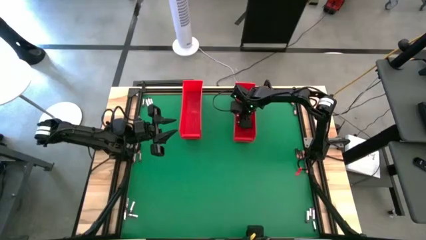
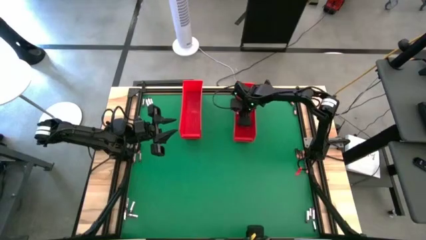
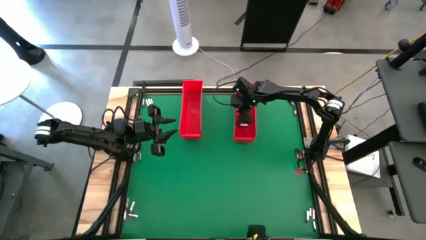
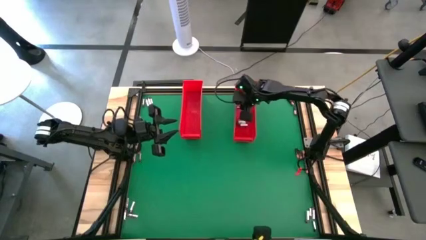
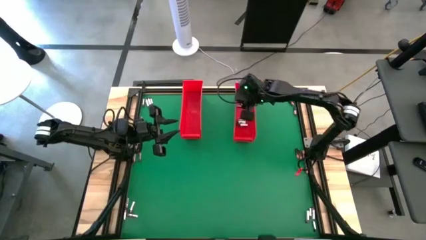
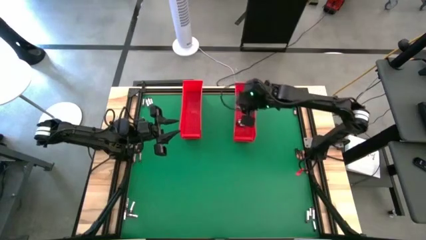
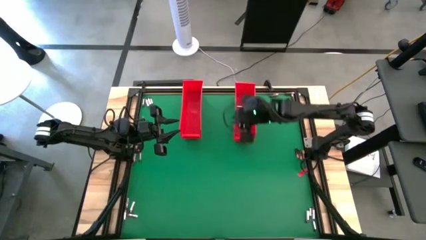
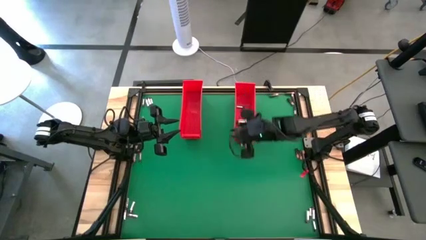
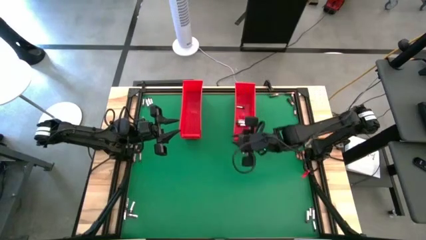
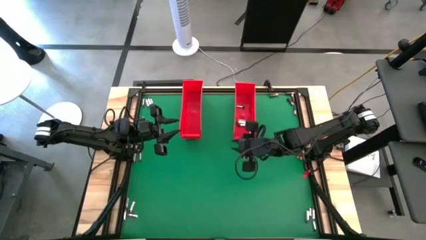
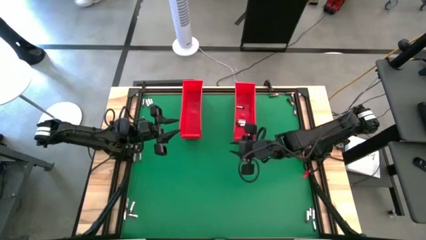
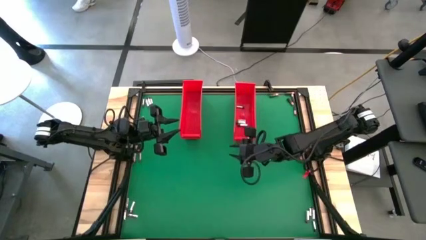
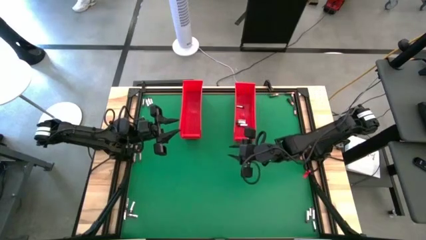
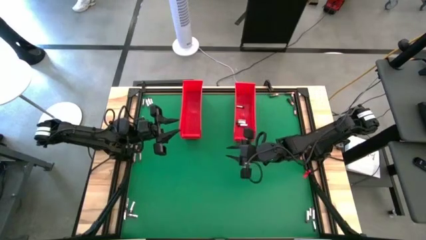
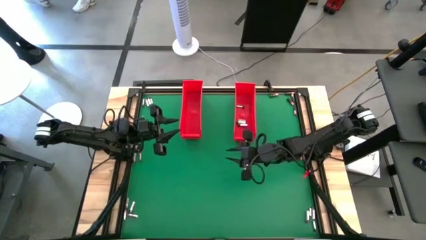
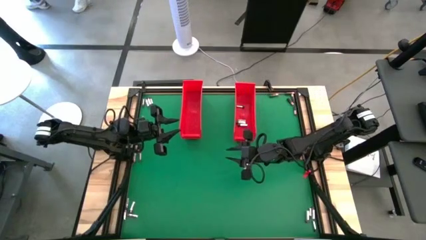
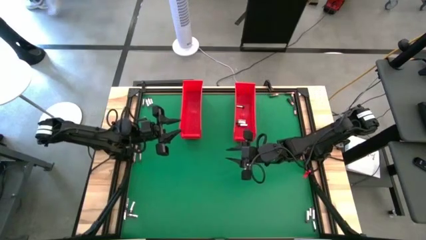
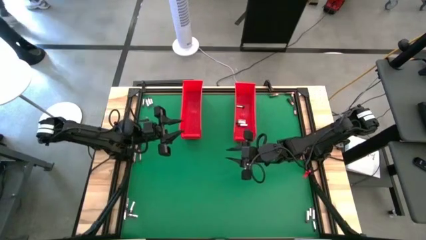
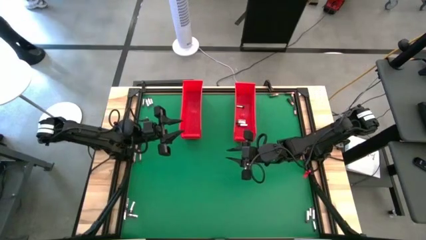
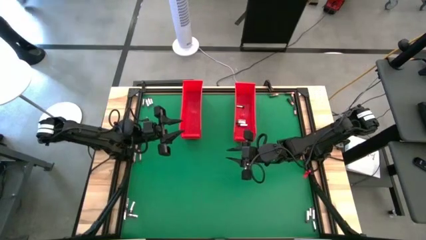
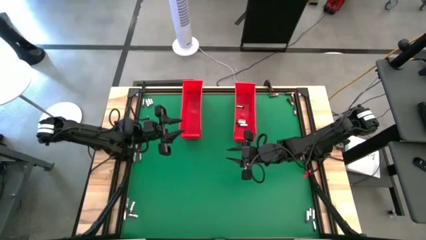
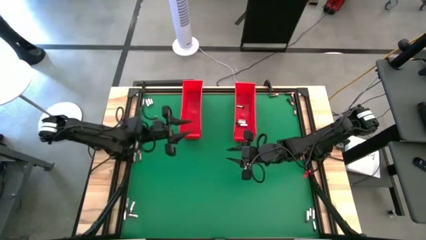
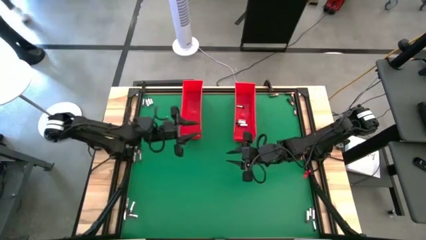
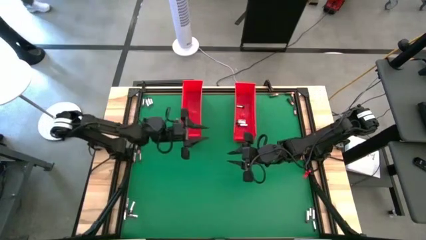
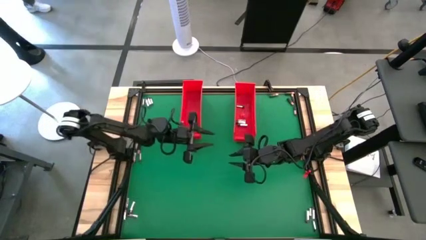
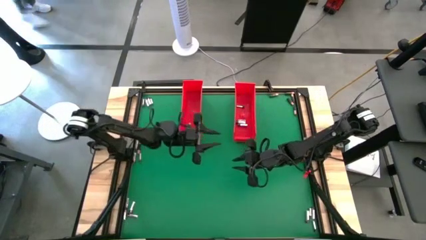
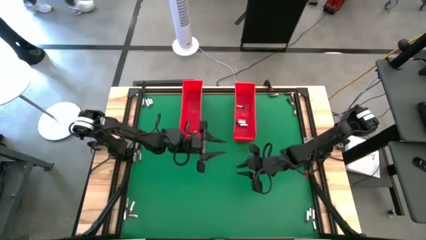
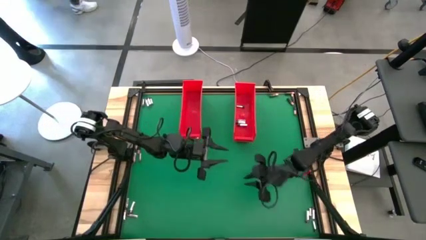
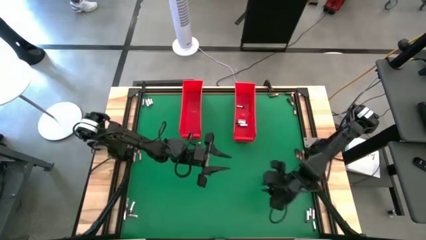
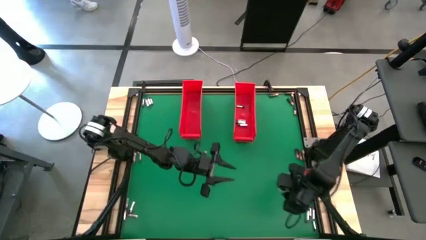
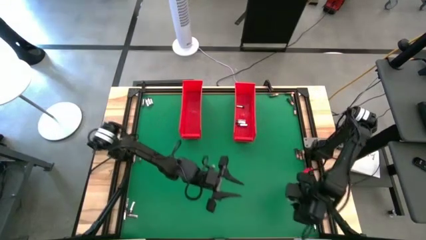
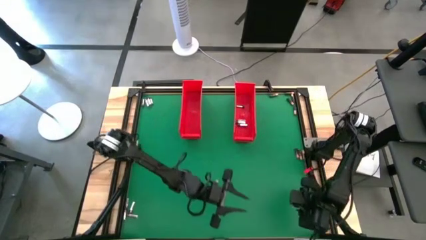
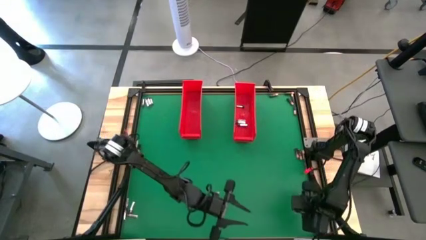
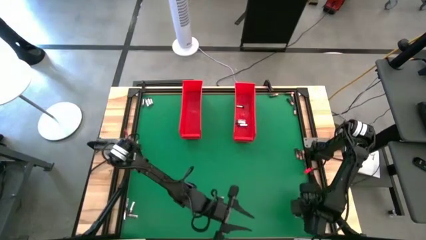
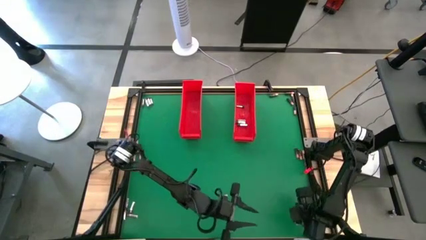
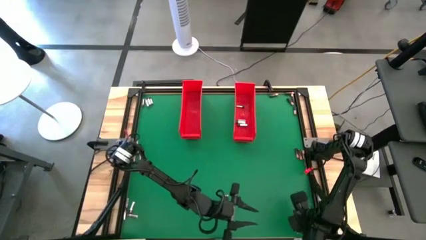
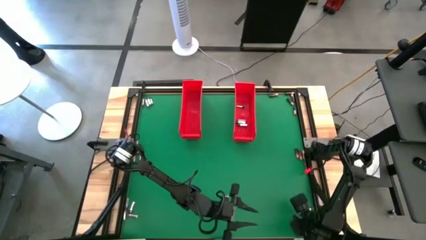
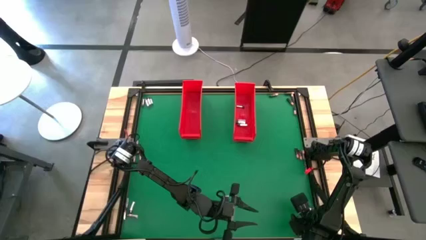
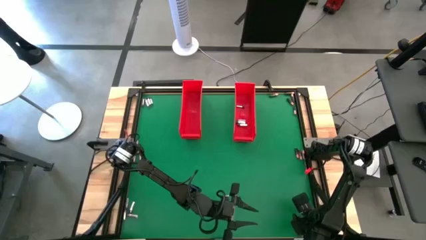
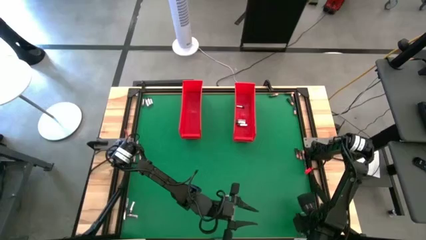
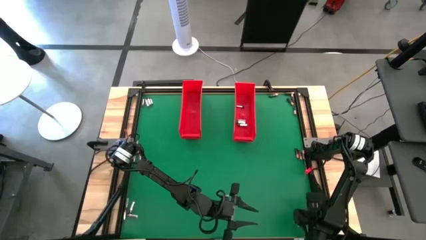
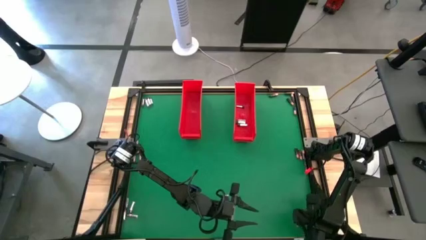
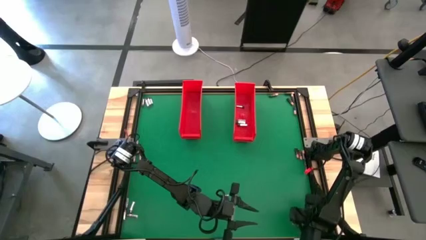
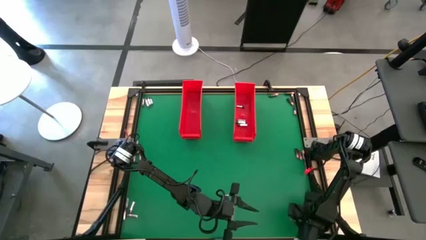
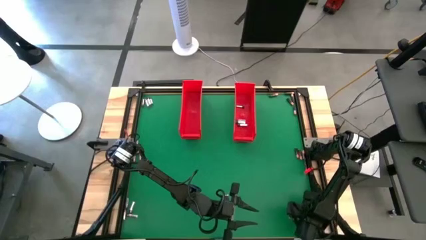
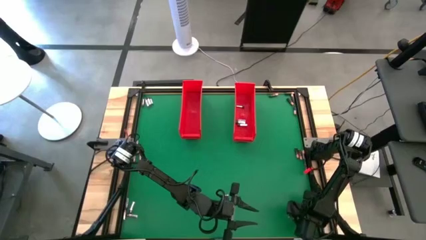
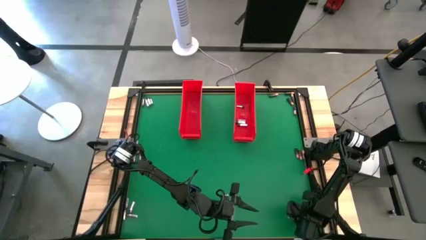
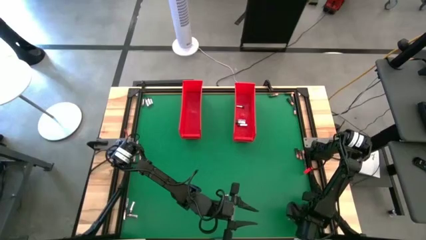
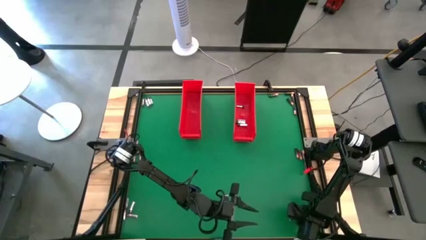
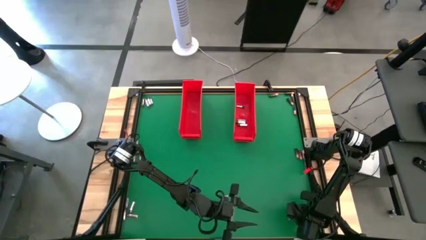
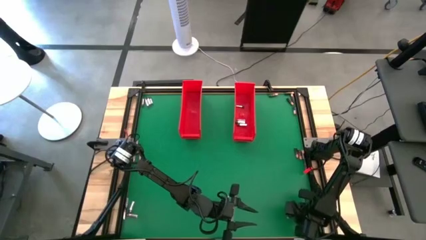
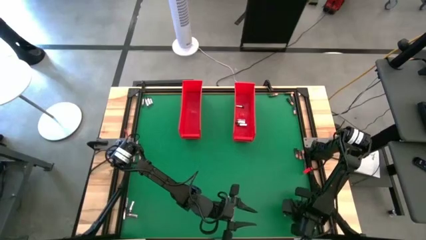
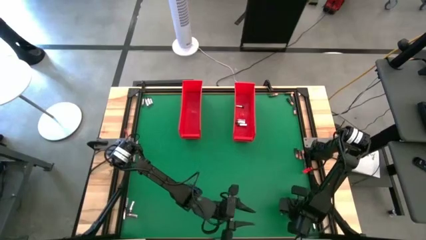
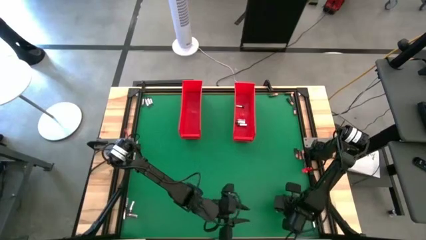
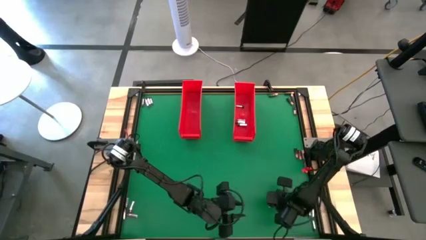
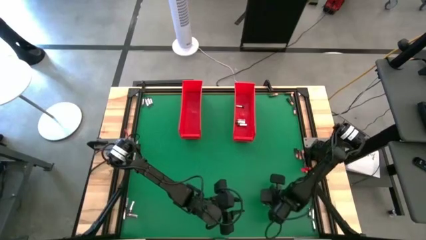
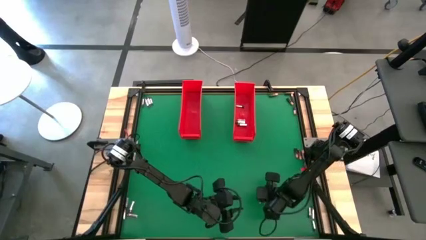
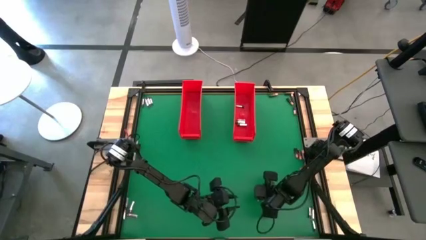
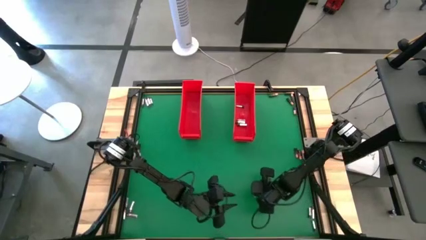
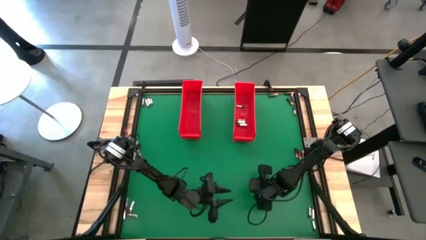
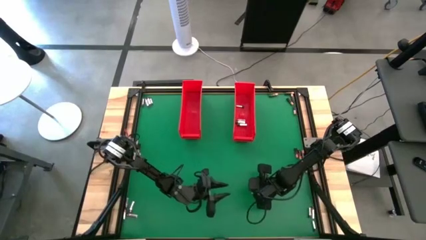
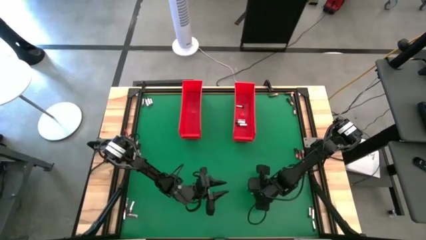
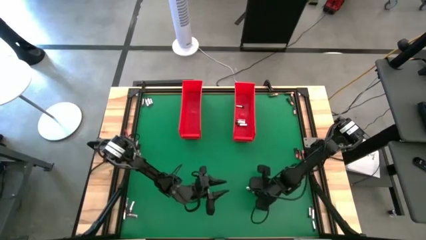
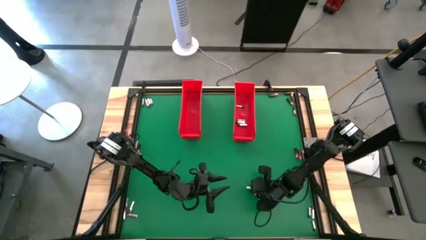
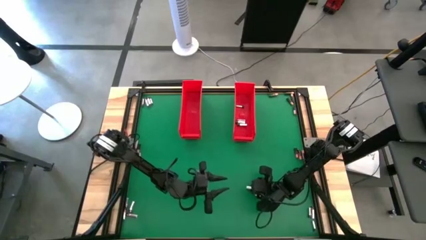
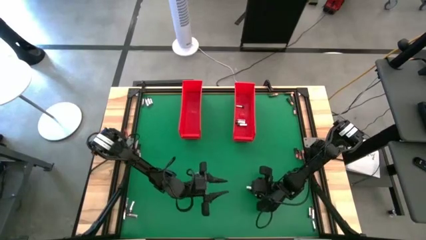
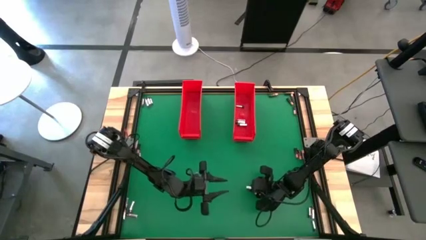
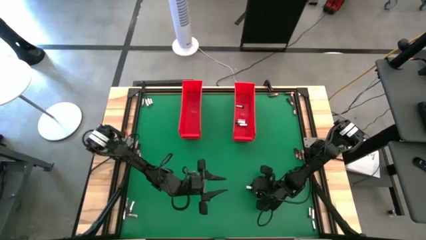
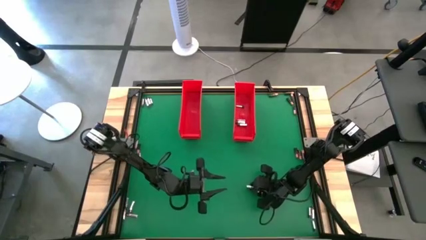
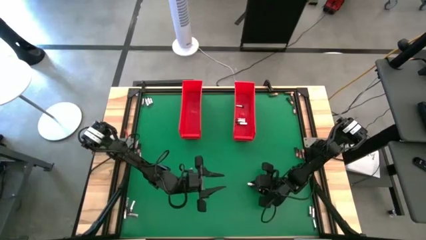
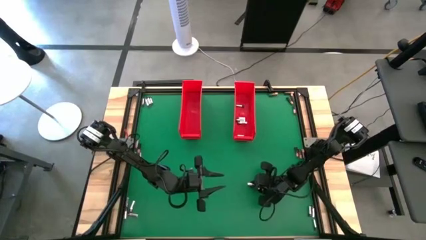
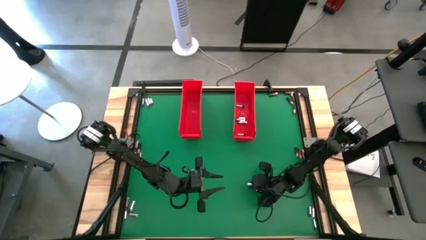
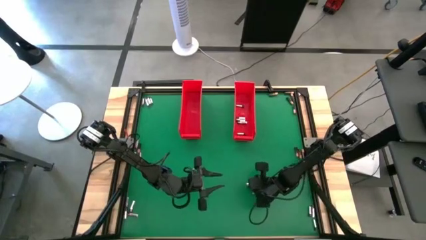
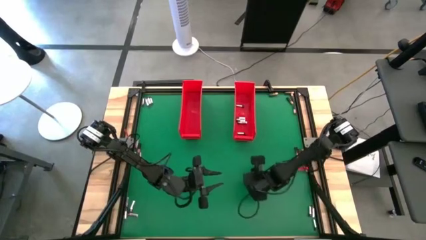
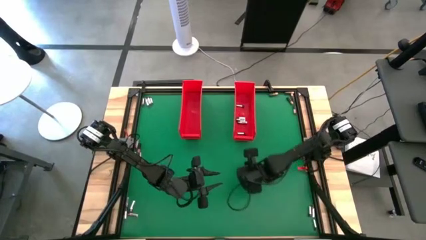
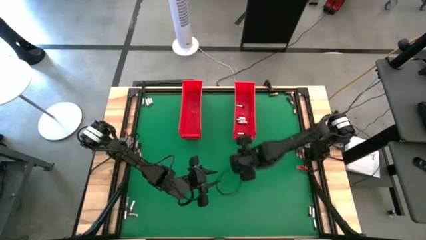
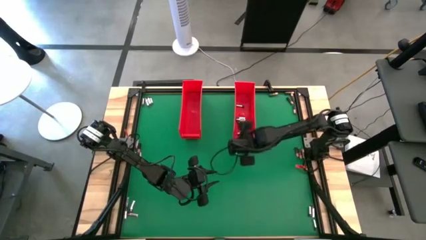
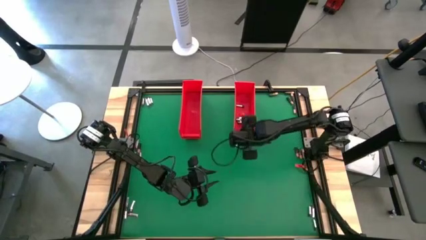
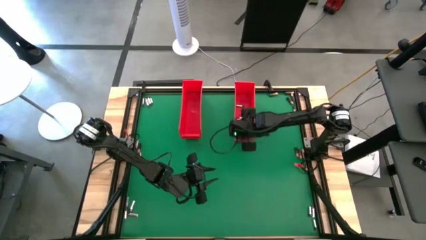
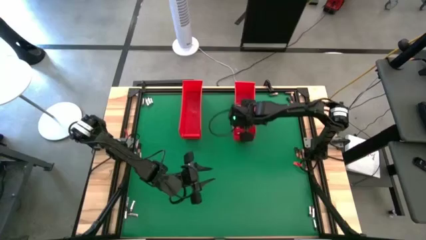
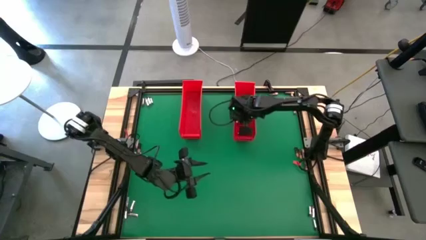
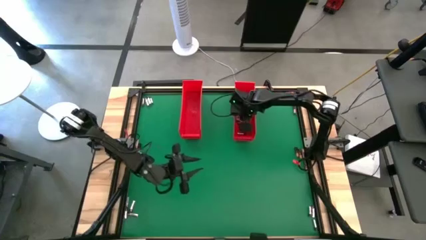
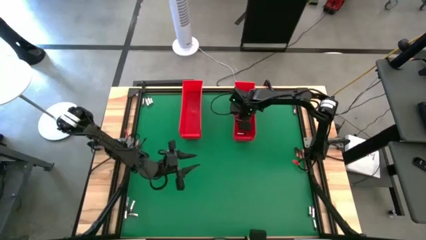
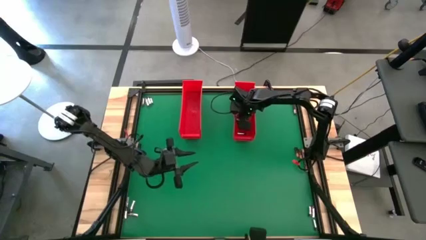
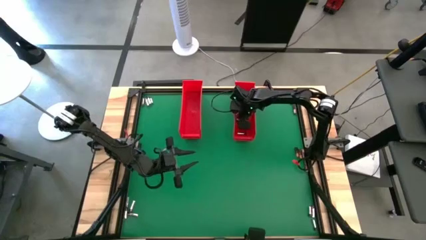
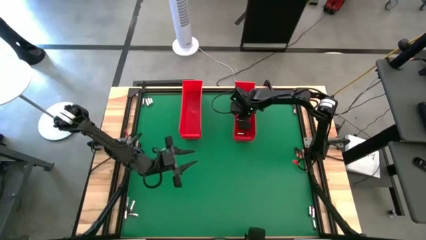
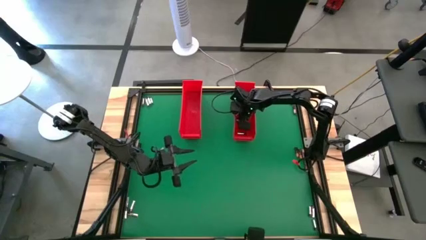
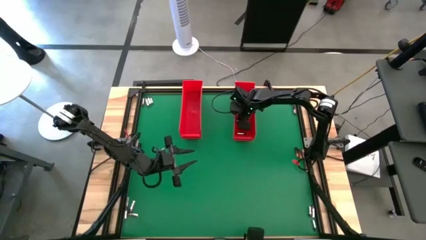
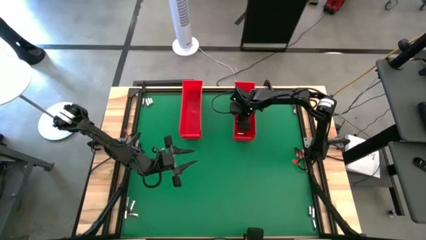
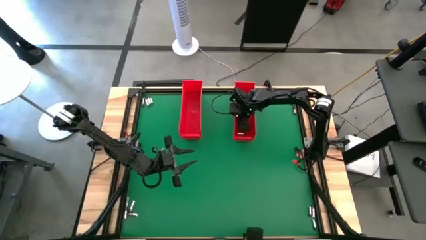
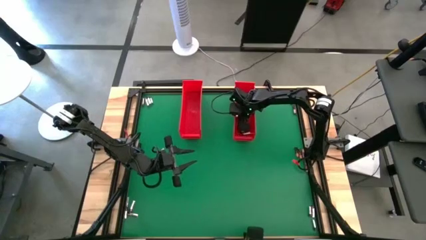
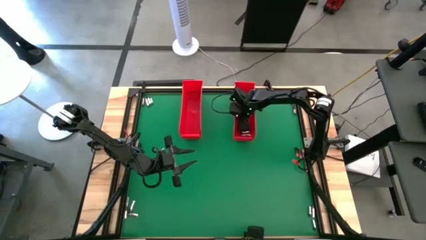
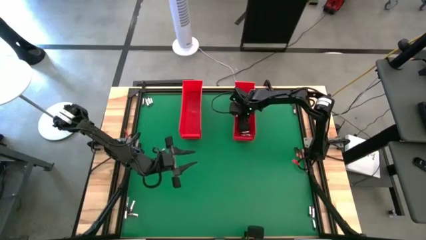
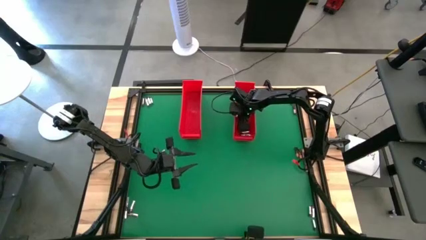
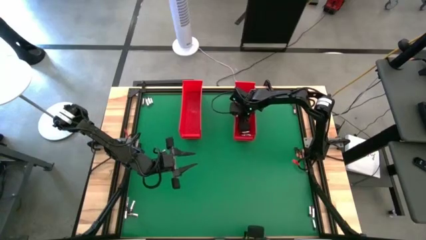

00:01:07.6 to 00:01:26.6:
Task: Sort batteries
Put the silver battery into the right red bin
